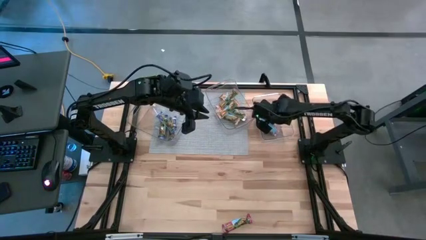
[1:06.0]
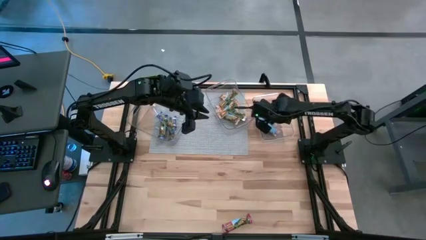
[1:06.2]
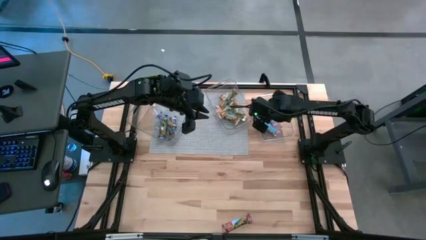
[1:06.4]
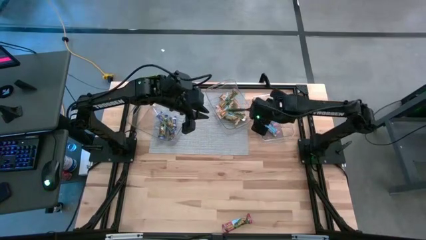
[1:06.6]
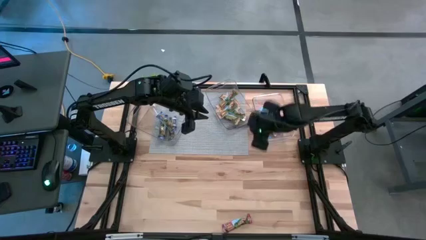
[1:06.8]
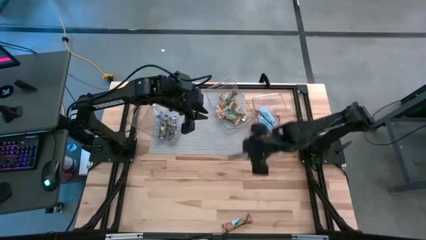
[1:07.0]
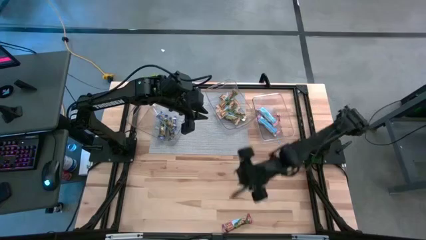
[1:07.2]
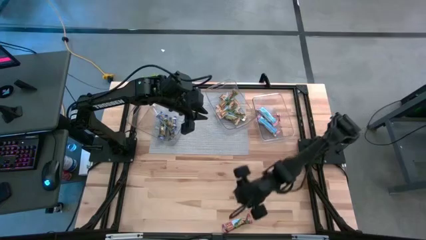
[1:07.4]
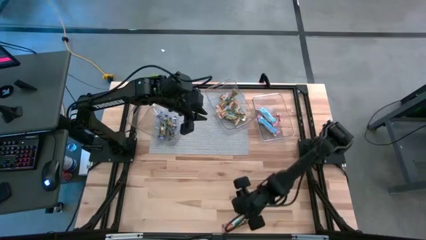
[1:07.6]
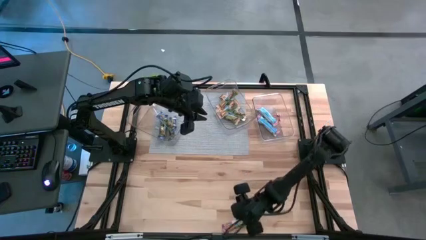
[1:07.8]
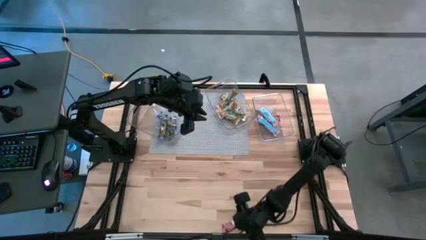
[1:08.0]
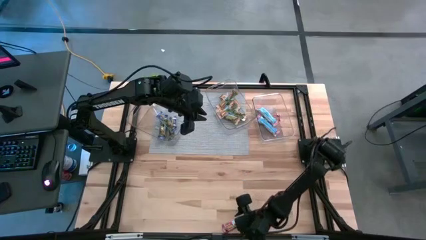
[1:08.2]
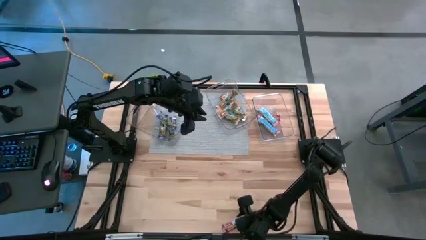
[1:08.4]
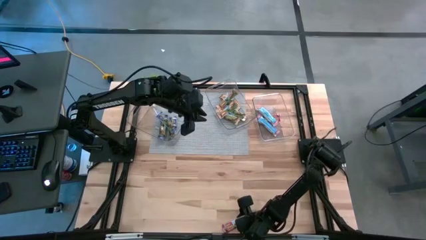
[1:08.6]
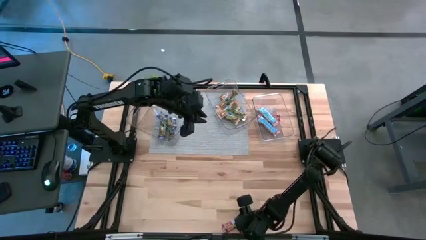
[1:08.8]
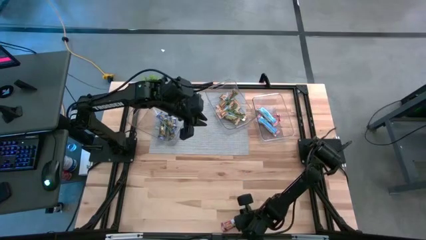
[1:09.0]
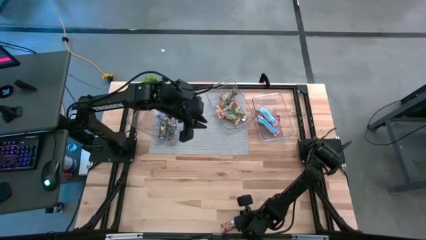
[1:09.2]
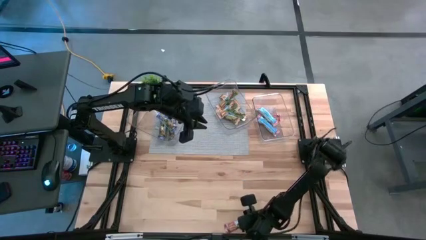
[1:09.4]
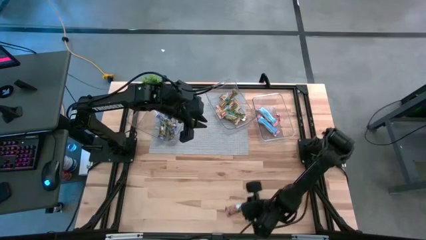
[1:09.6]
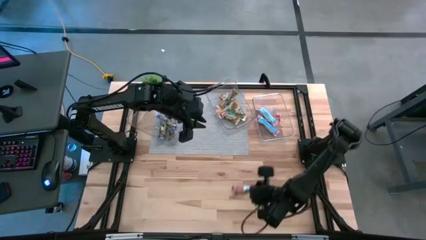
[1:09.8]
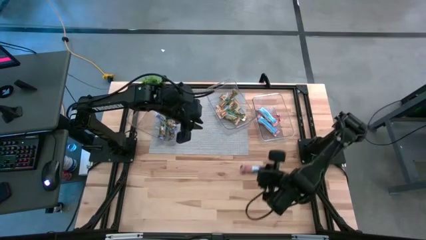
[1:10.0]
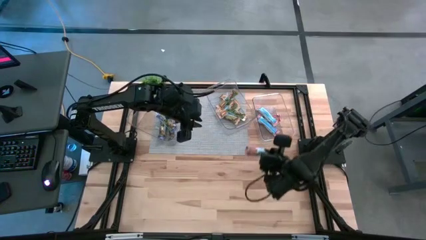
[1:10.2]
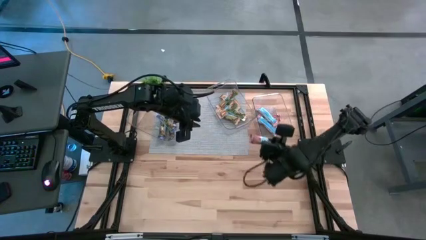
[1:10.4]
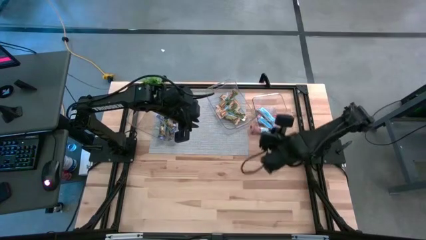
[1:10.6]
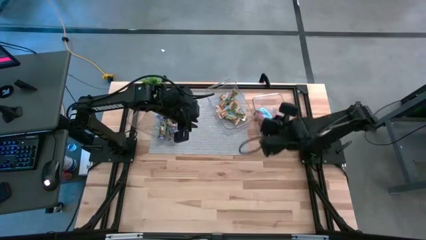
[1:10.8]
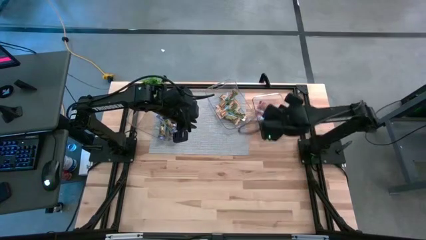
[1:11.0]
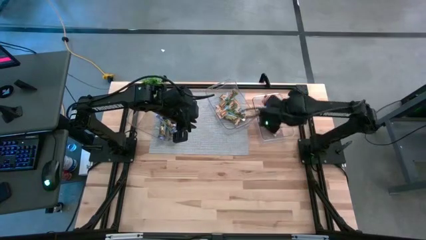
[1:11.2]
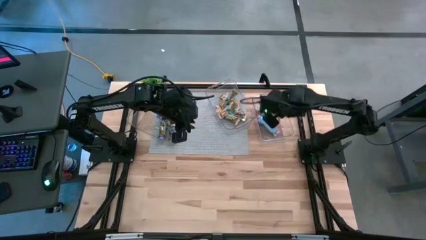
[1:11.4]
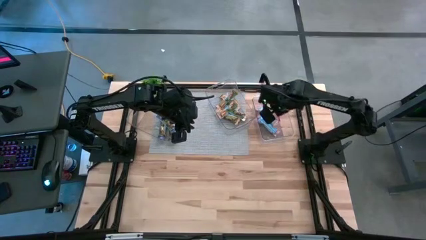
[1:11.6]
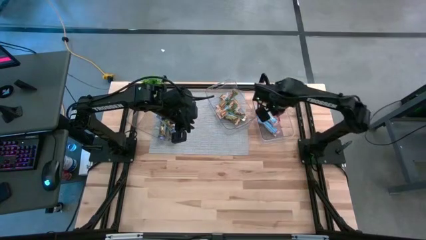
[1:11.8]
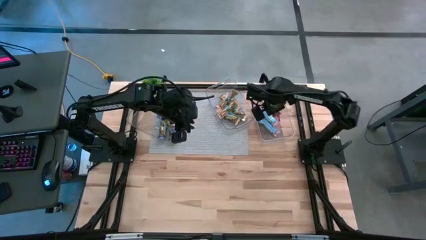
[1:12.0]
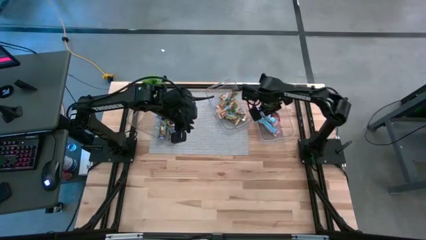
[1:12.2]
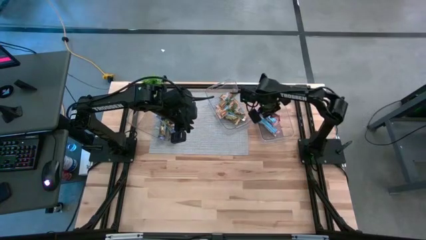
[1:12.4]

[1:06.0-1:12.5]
Task: Pick and place Granola Bars by type
Put the red granola bar into the right transparent bin

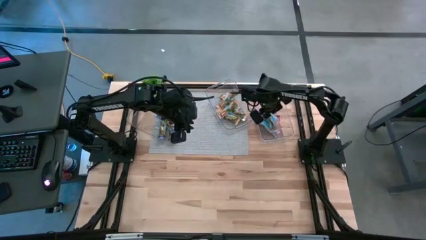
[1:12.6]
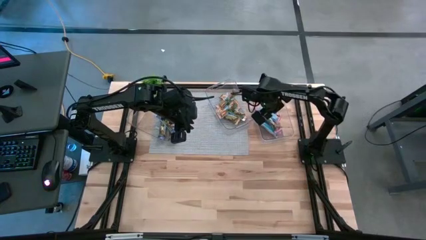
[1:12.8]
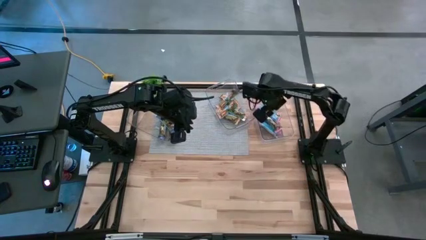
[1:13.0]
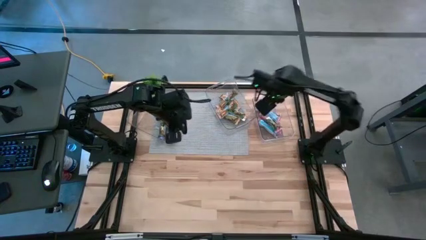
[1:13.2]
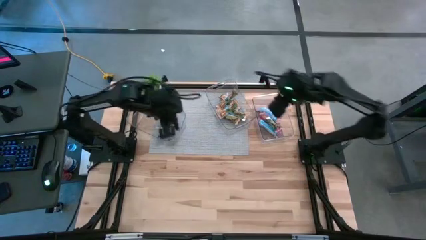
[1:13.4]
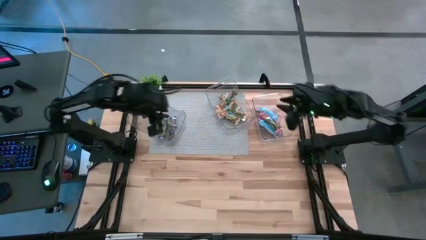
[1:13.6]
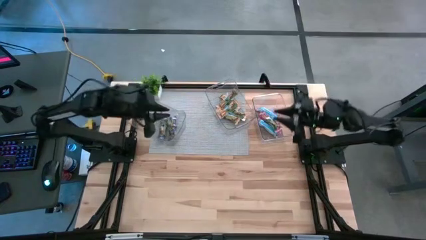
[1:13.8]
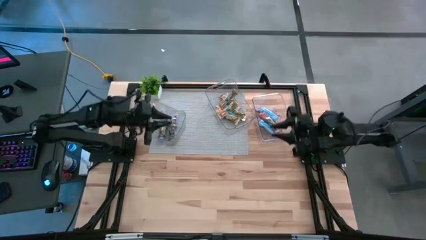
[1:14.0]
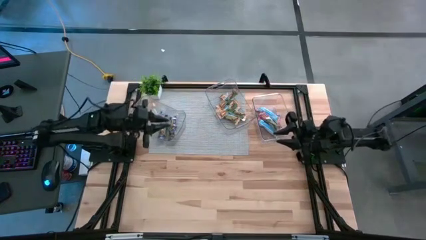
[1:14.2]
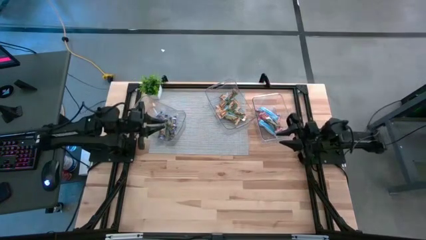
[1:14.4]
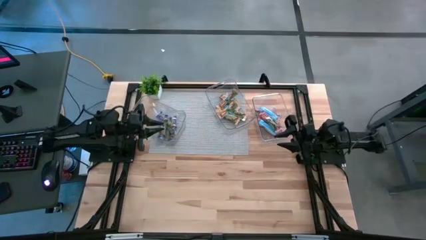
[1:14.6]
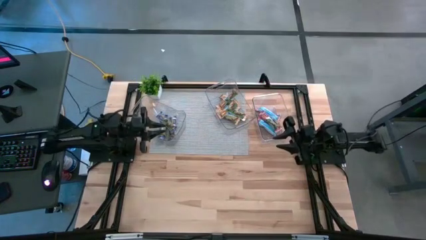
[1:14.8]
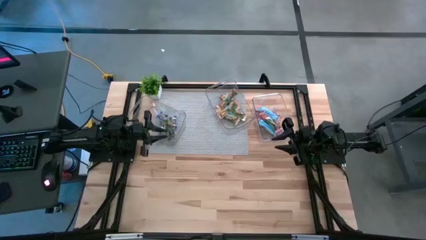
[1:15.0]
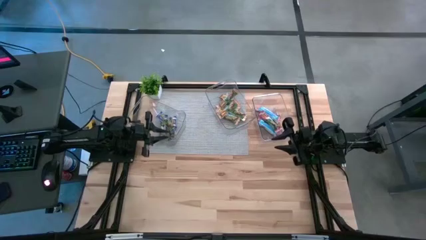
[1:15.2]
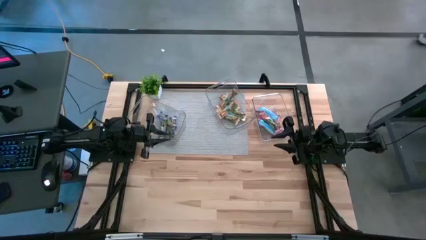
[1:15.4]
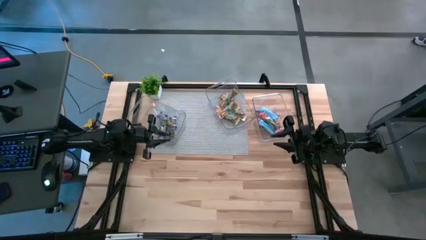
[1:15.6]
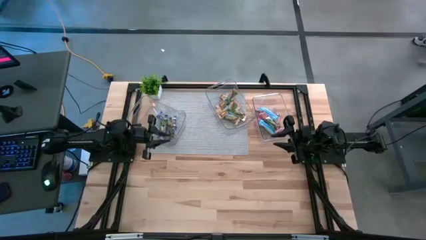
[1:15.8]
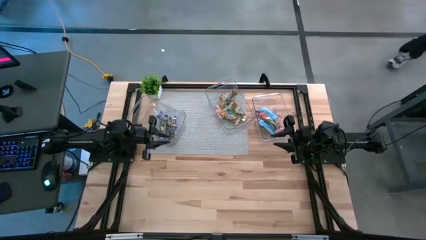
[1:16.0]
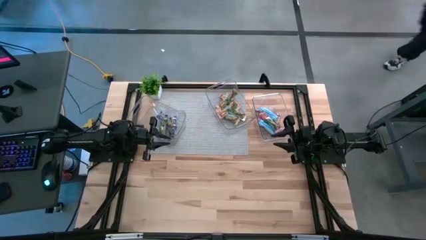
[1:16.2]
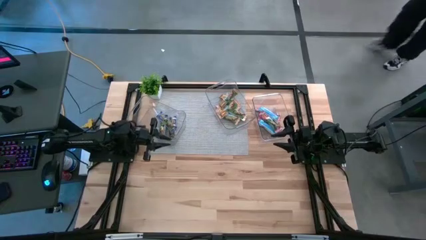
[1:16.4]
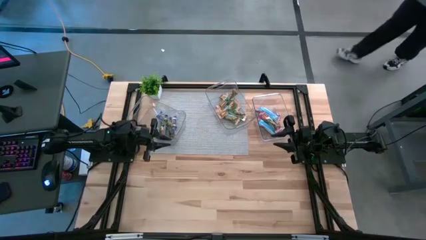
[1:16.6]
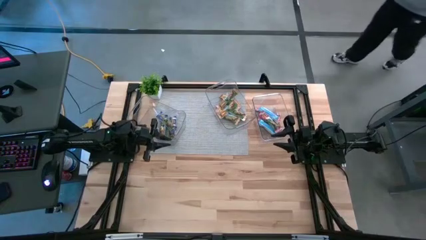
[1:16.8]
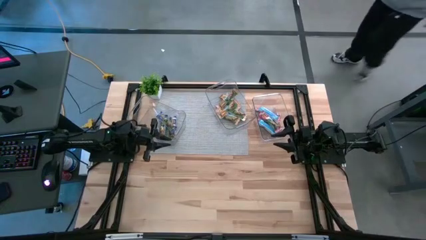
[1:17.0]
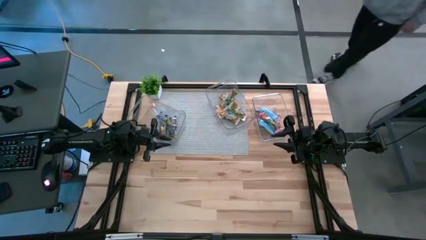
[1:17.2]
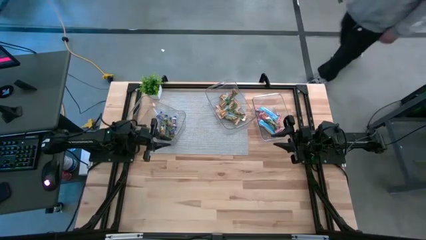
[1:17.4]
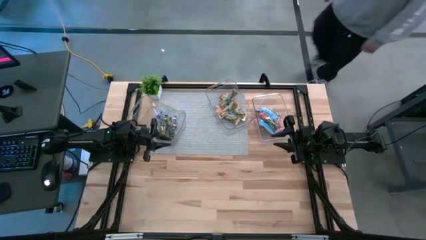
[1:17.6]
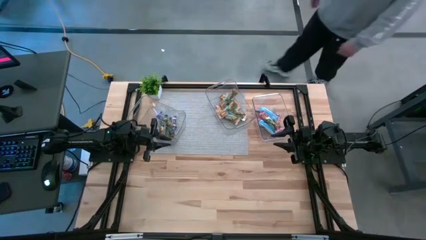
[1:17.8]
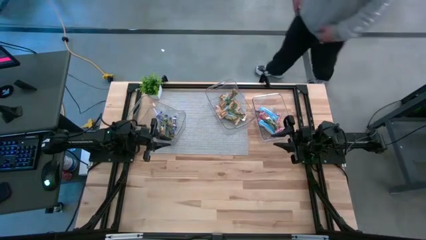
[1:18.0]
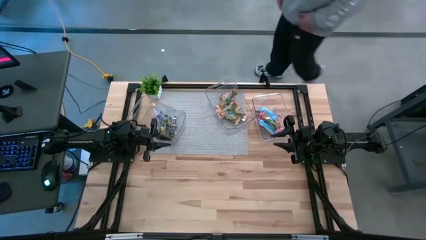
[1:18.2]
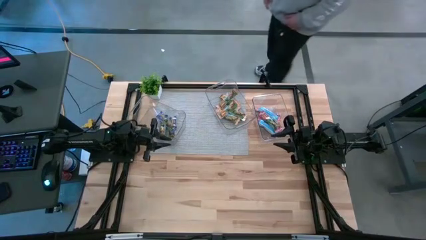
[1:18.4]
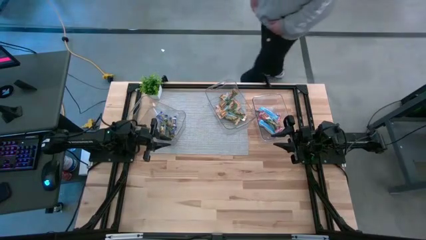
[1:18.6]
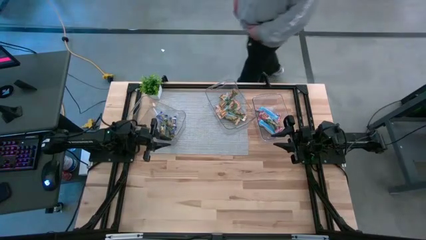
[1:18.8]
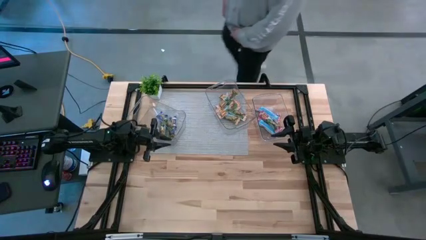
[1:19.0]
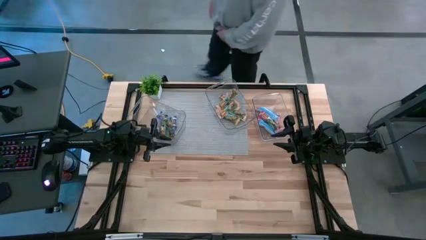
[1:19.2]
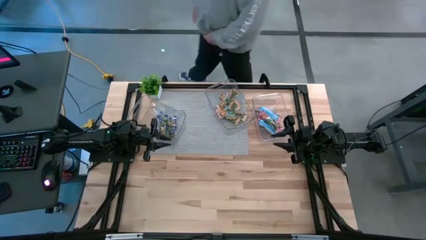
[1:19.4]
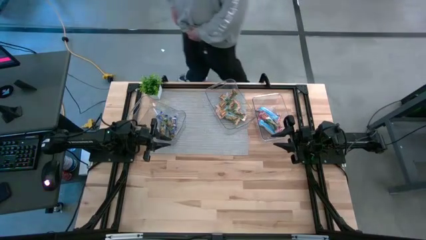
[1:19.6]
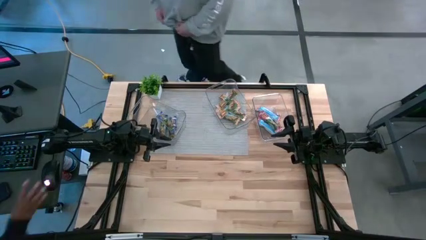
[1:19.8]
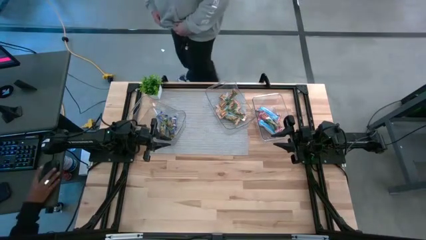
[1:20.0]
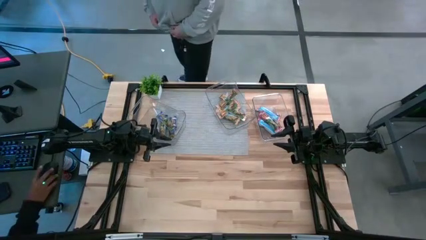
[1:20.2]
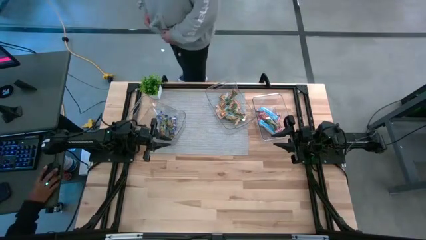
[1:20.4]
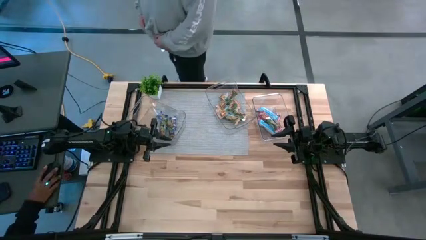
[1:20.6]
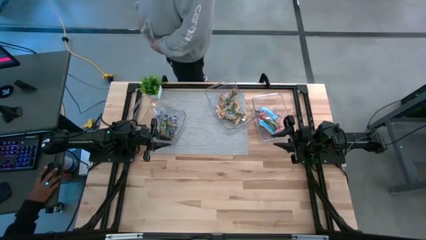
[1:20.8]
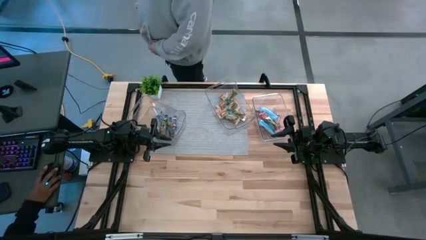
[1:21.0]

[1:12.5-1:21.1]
Return to Home Position

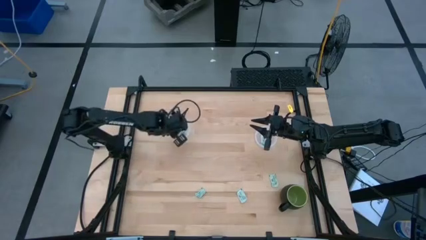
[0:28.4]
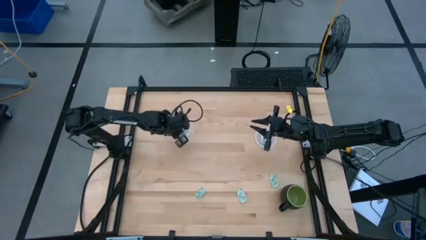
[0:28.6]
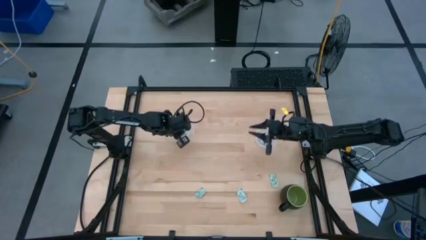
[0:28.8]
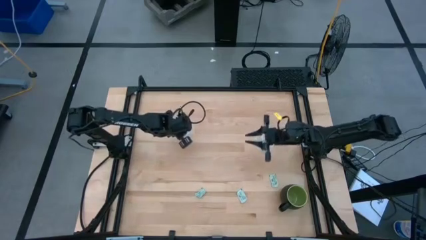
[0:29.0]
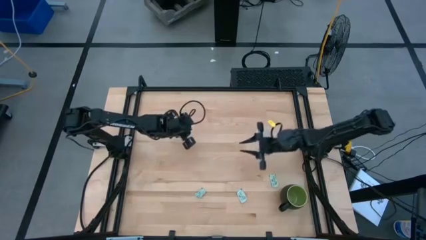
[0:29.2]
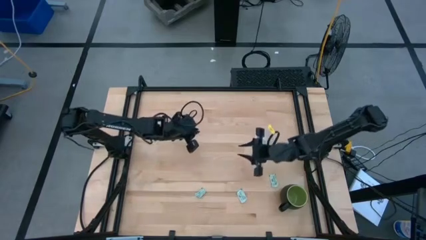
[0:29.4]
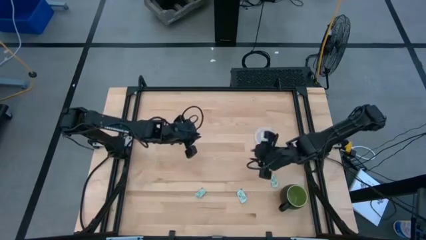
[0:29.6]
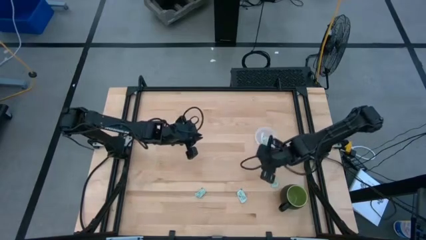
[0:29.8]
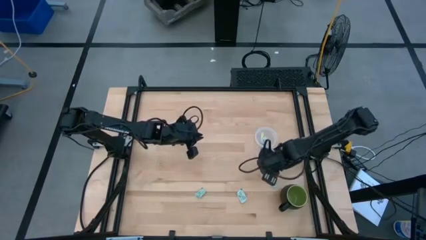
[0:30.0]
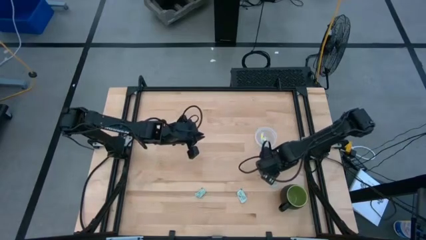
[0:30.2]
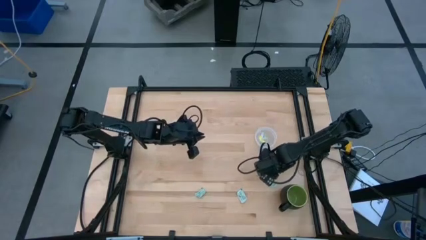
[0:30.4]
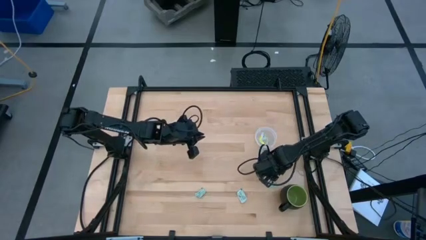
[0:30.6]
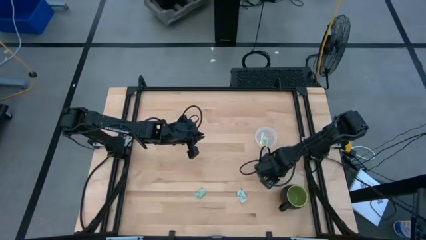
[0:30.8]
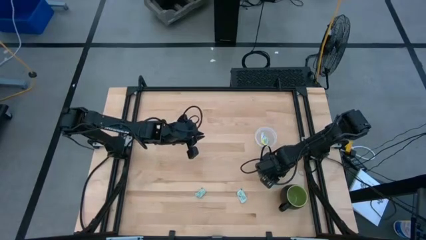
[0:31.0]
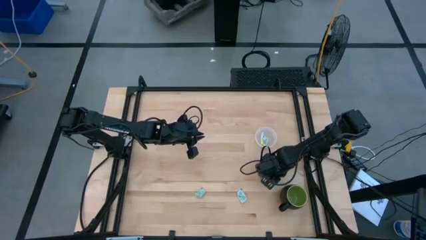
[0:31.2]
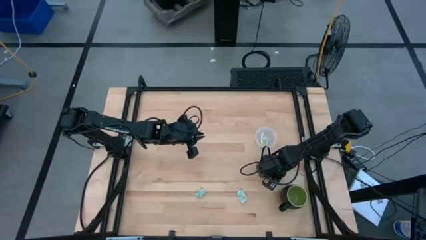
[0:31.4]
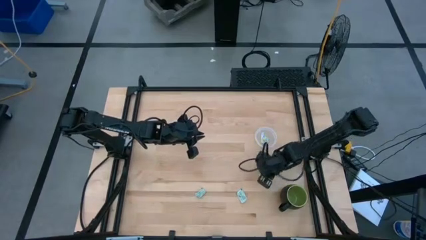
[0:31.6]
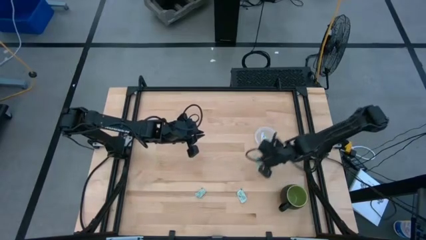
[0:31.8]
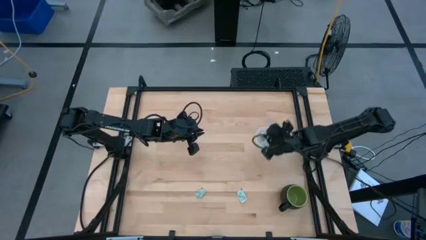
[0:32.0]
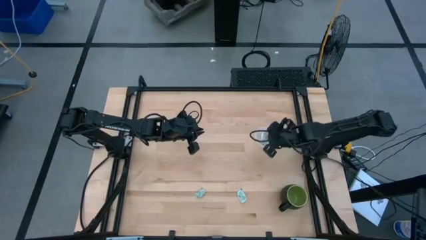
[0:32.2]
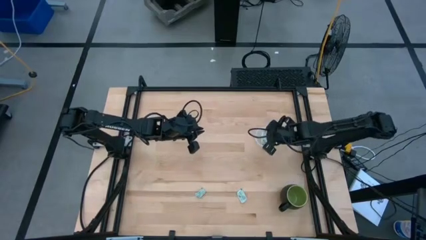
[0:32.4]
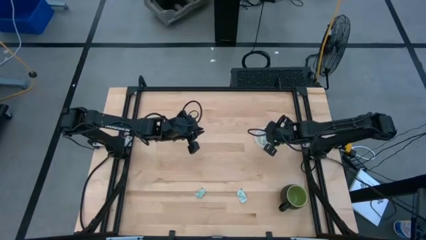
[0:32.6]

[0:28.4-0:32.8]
Task: Pick and place Stevia / Truvia into bins
Put the stevia packet into the right transparent container
